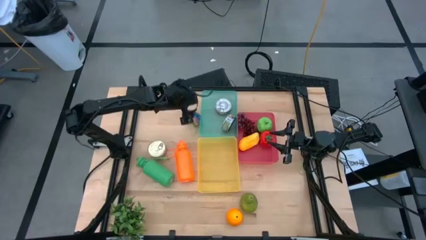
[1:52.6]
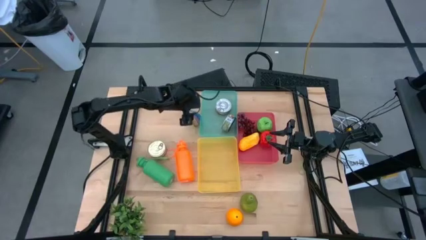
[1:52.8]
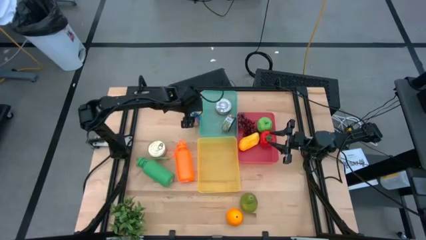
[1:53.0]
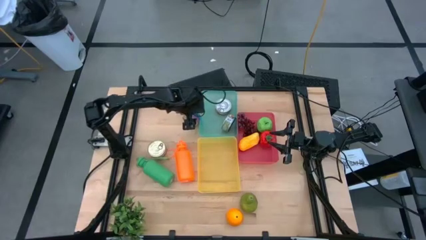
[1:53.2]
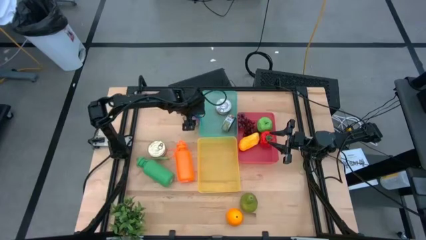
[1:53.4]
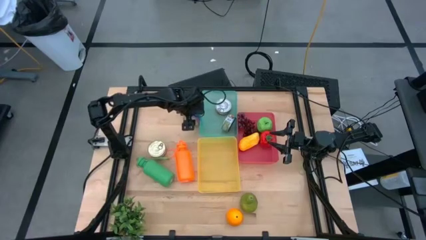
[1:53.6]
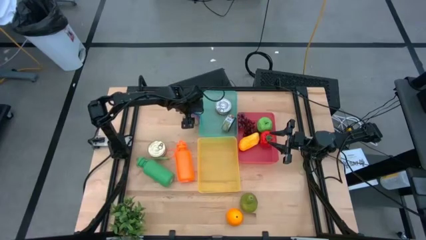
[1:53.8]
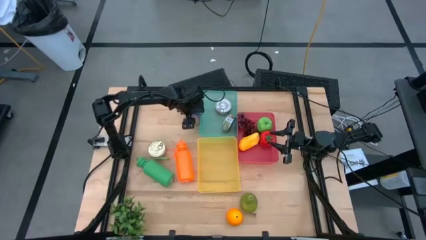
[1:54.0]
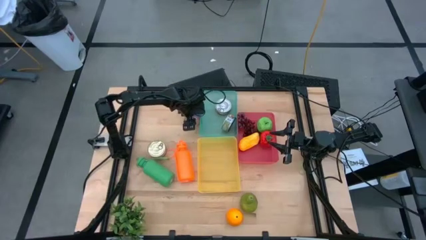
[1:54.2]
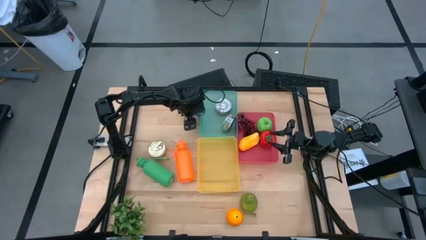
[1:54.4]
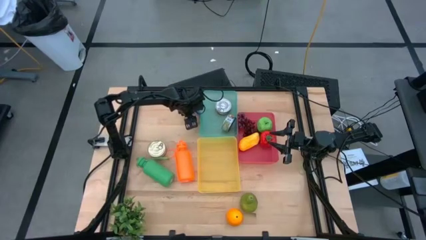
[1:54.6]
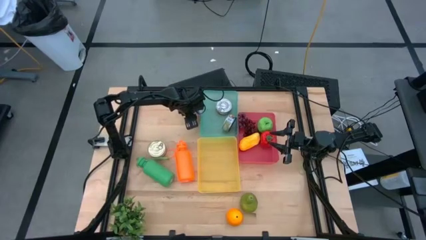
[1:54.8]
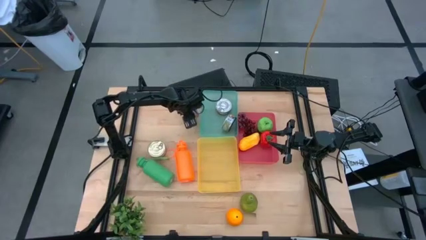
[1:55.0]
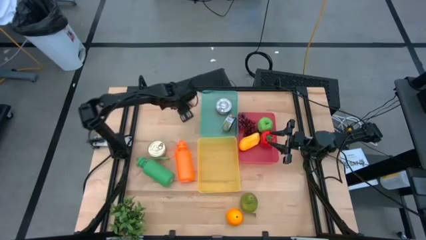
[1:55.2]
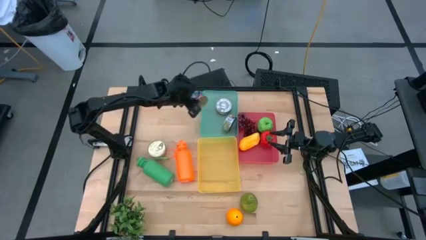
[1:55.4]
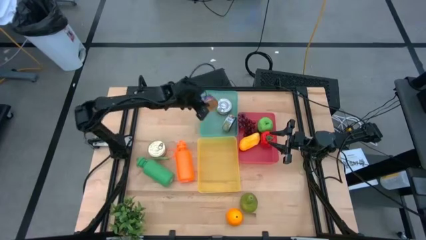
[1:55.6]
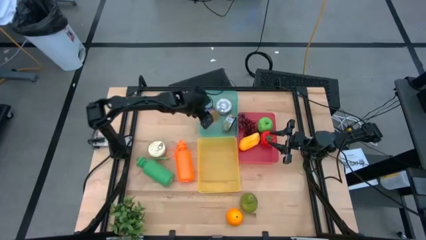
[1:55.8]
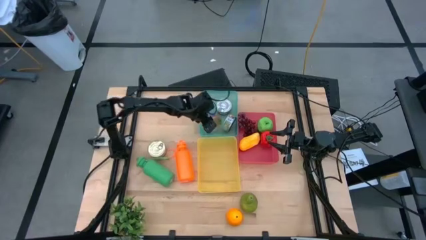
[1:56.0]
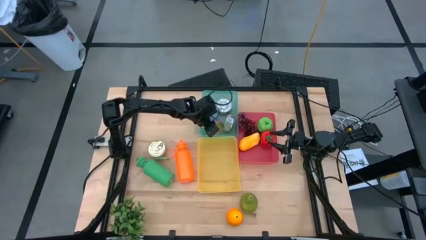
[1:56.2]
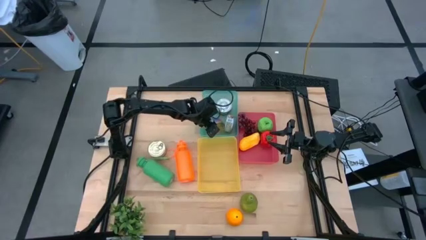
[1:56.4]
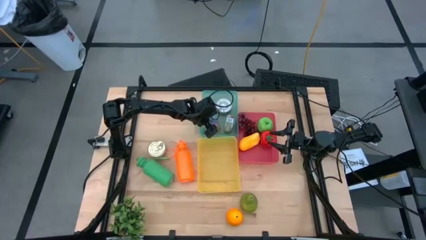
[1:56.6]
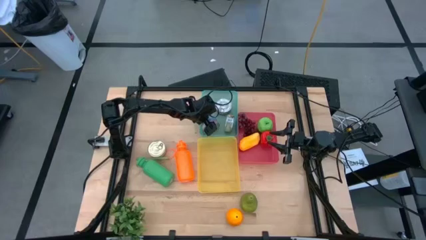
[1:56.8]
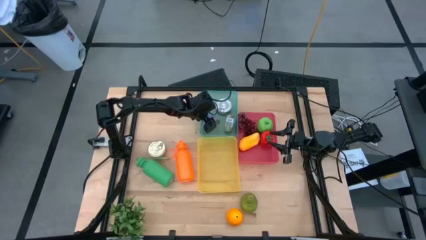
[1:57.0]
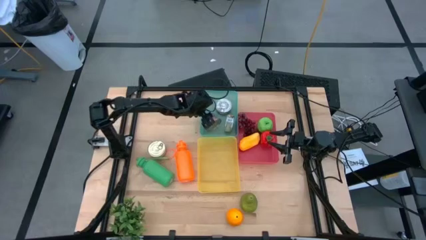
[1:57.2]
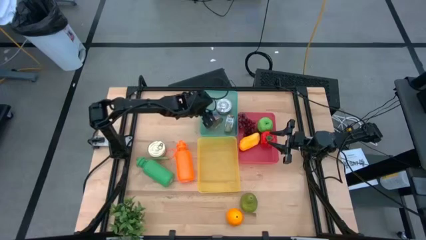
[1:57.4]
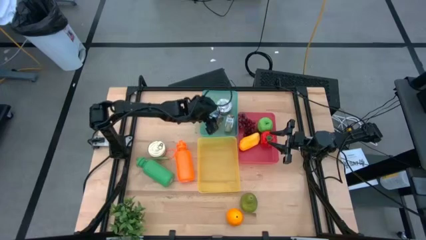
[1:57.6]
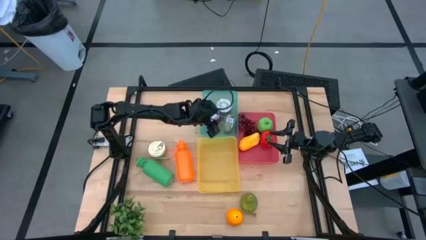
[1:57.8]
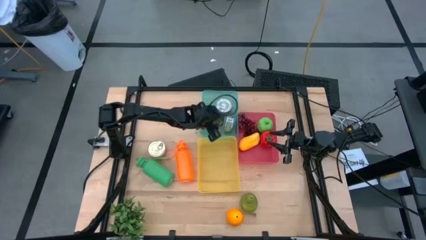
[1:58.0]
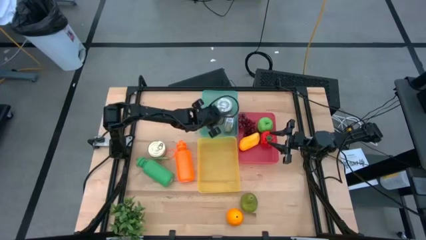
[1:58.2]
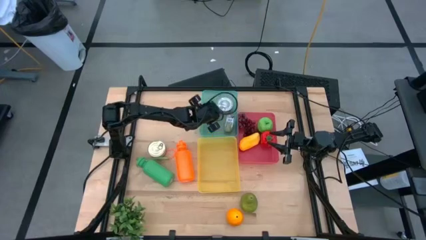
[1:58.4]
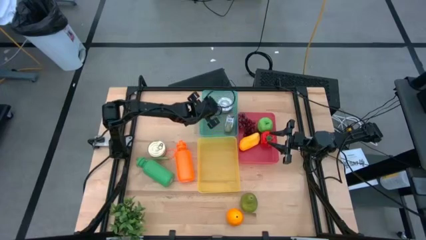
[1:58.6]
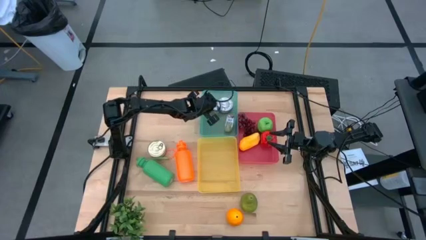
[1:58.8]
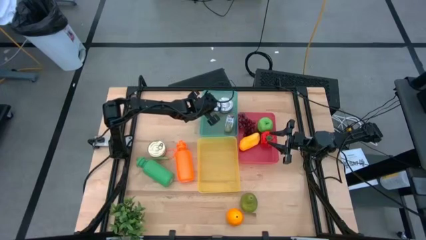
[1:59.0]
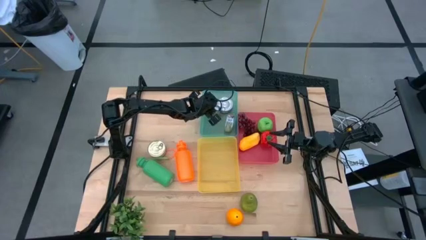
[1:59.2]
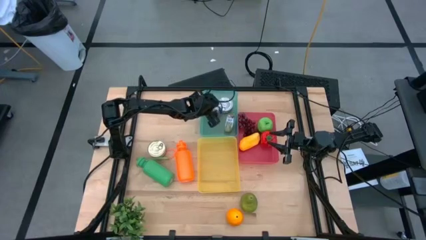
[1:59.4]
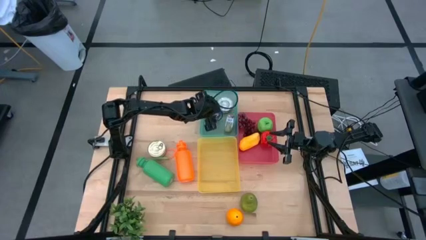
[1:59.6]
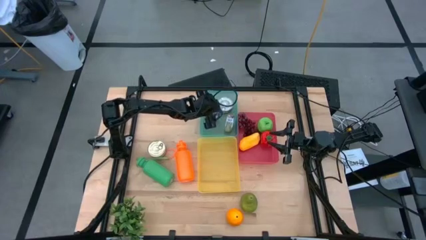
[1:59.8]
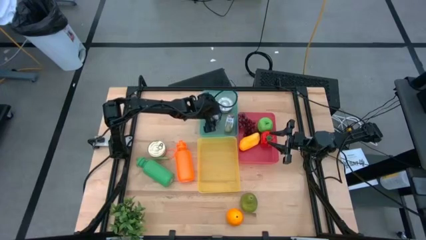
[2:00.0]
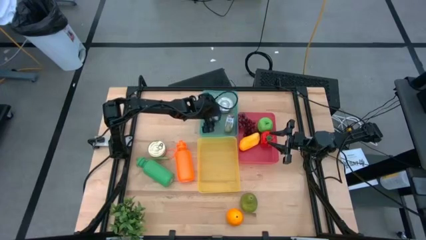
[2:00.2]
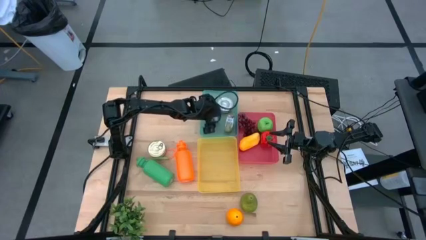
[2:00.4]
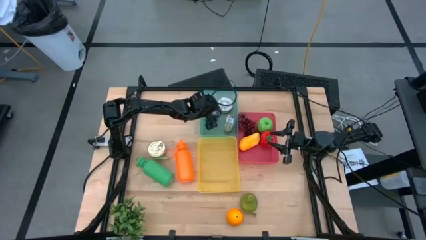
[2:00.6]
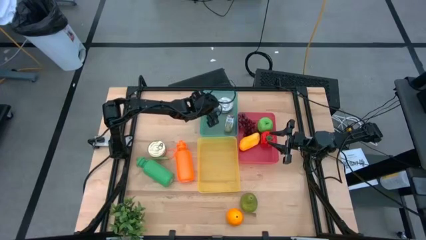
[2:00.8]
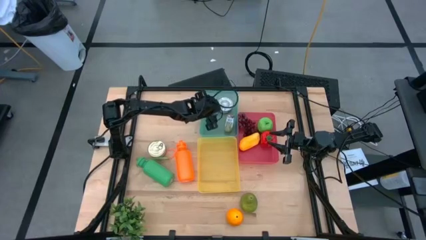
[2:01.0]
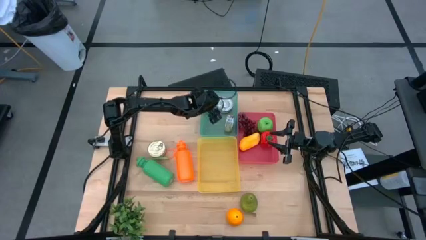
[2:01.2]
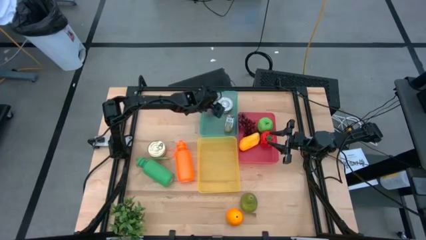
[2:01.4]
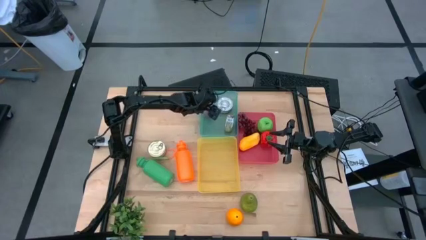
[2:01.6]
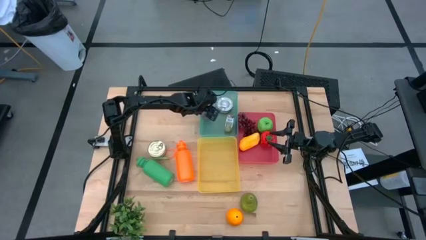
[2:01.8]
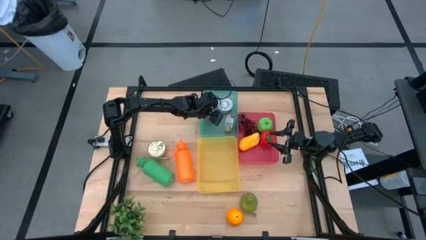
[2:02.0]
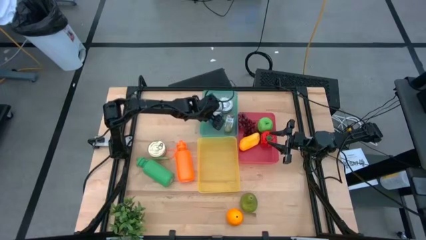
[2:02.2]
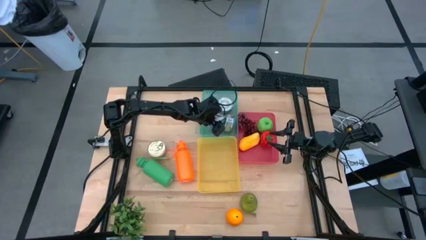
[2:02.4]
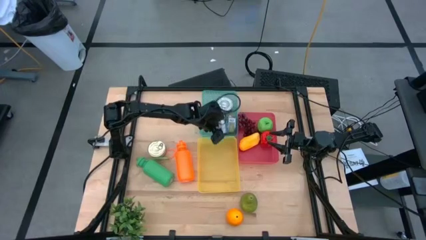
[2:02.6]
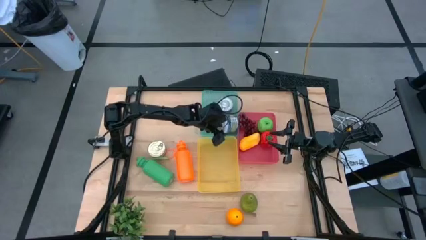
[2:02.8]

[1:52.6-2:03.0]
Task: Pick & Place Food Item
Put the top blue pink tuna can into the light blue bin
